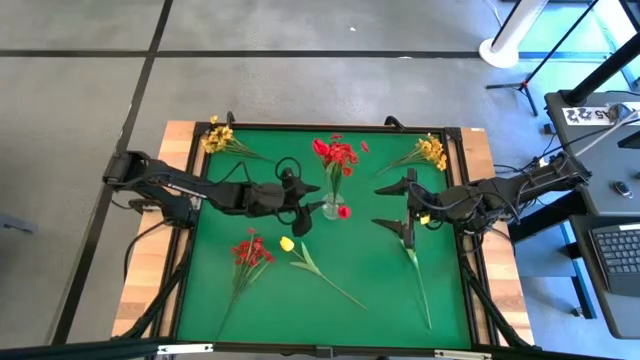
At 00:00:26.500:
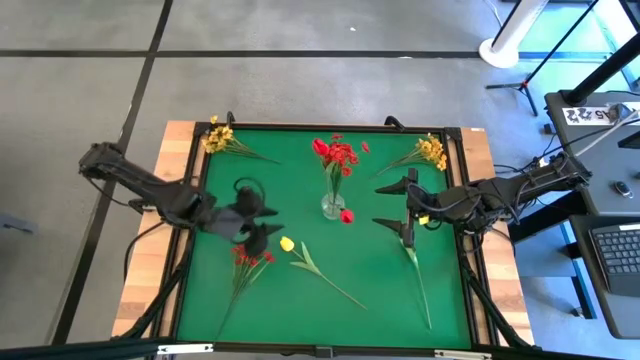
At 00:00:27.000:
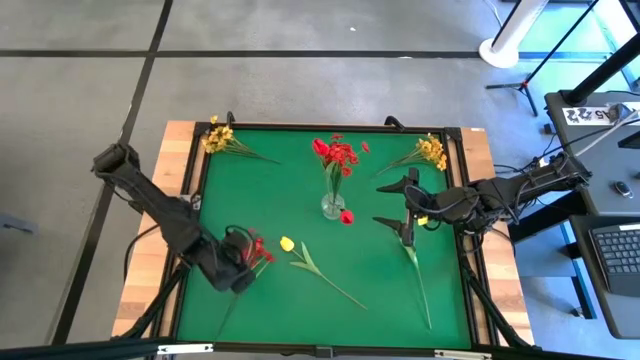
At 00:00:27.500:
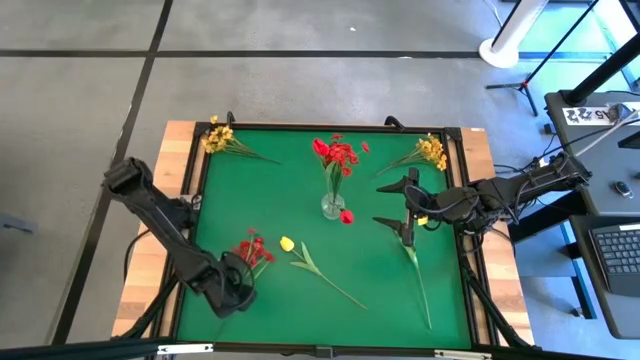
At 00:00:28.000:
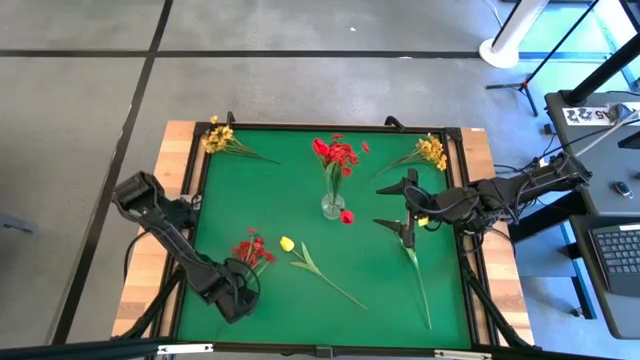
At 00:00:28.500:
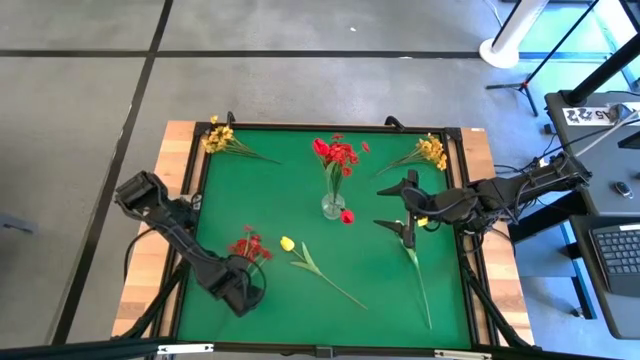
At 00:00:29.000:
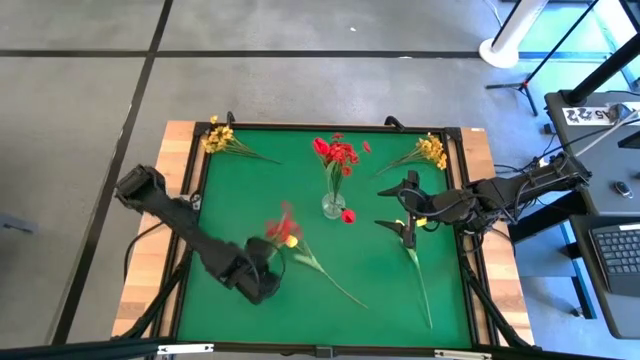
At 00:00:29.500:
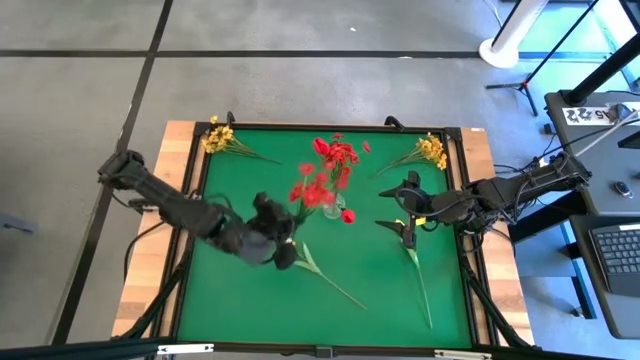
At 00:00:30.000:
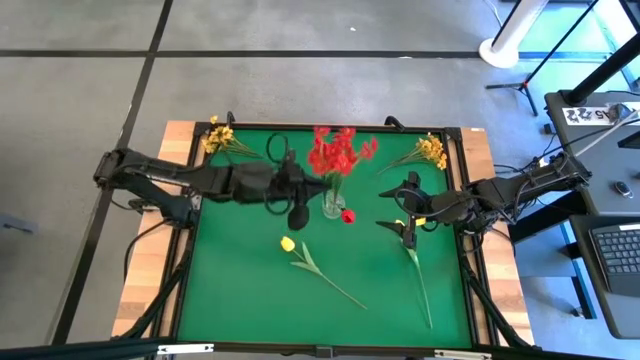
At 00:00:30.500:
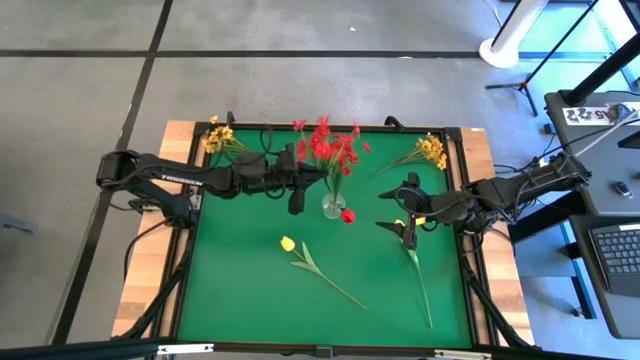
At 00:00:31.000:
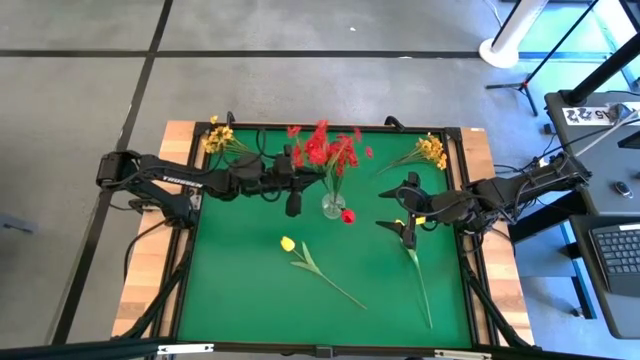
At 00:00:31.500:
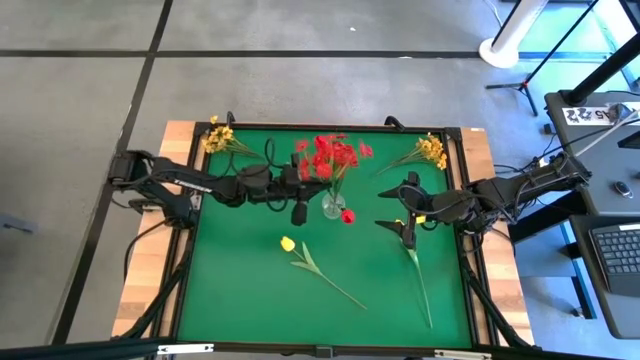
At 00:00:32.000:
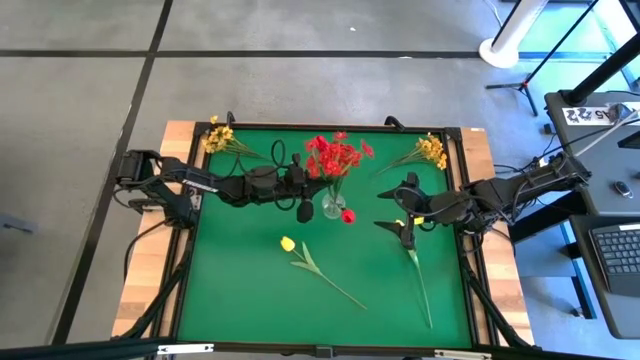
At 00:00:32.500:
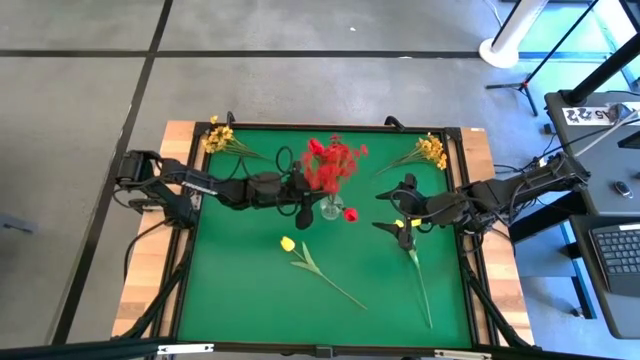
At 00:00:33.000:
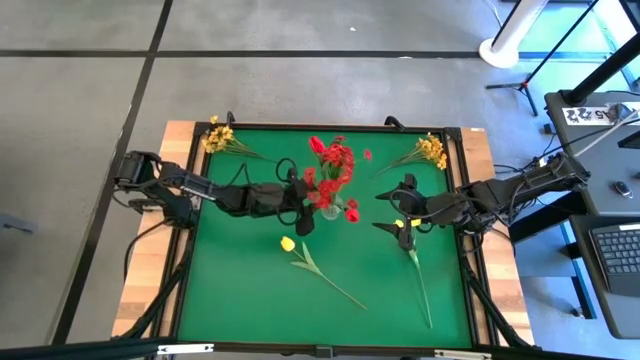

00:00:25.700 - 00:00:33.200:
Task: Sort flowers into vase by color
Put the red flowers into the transparent vase

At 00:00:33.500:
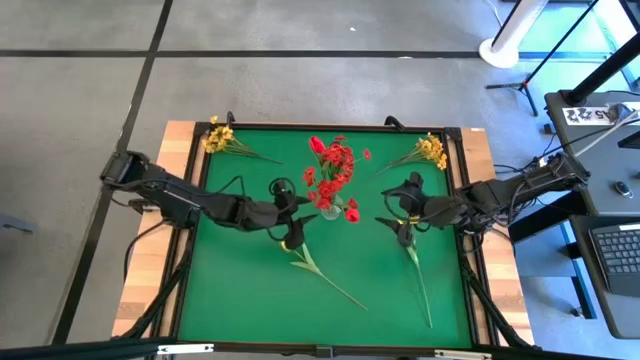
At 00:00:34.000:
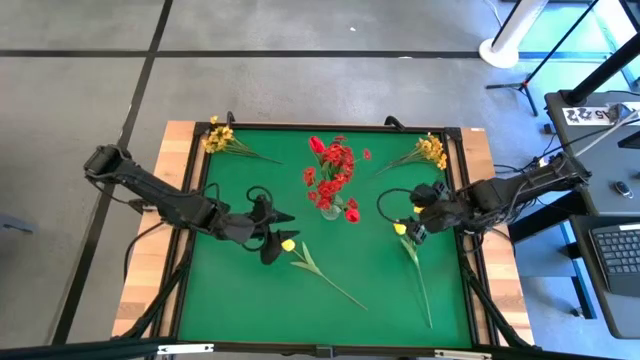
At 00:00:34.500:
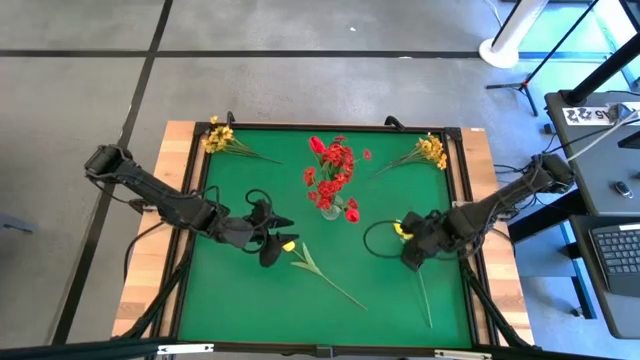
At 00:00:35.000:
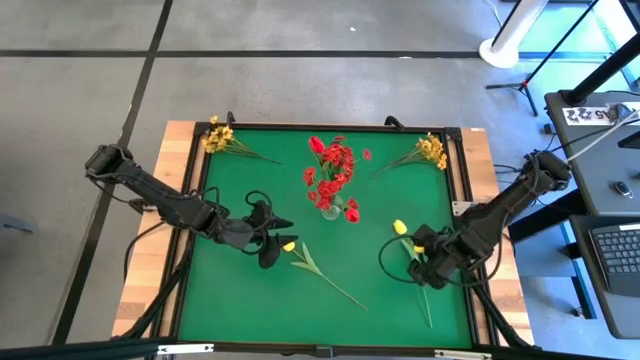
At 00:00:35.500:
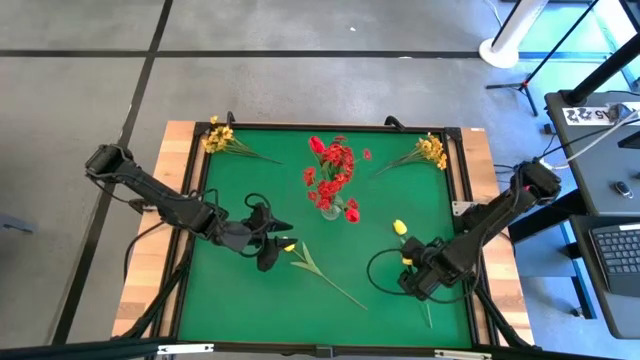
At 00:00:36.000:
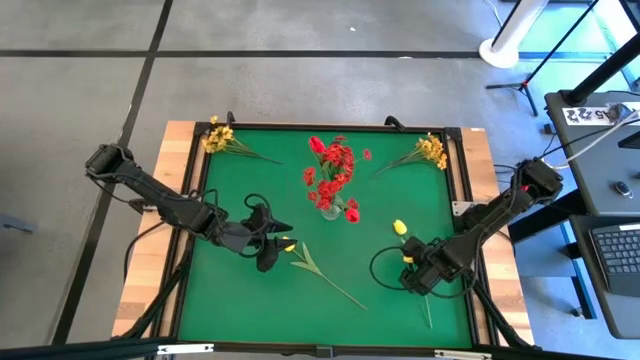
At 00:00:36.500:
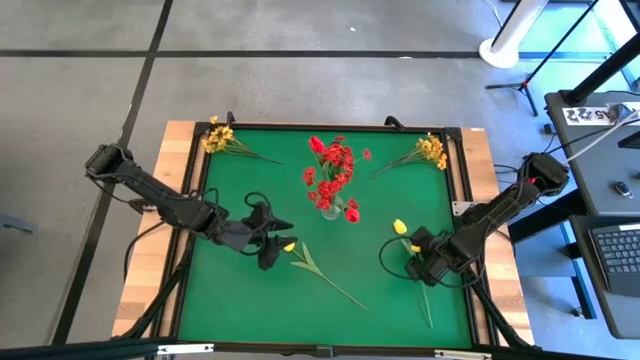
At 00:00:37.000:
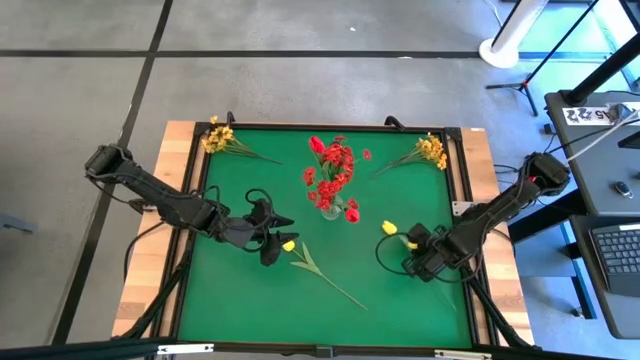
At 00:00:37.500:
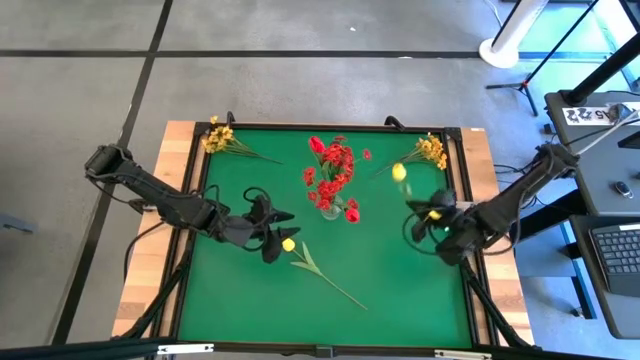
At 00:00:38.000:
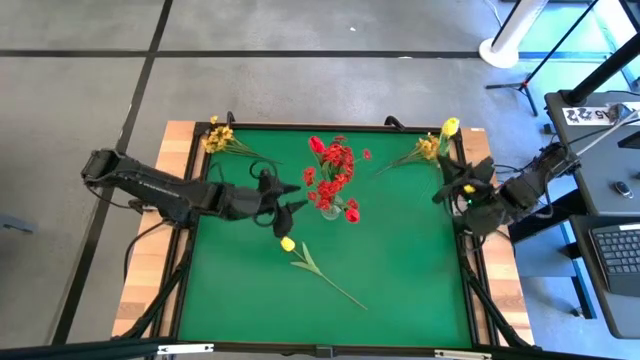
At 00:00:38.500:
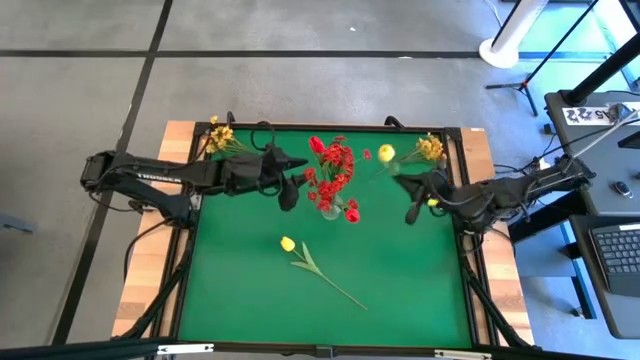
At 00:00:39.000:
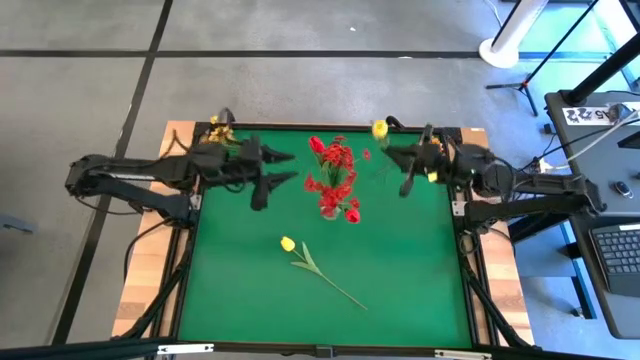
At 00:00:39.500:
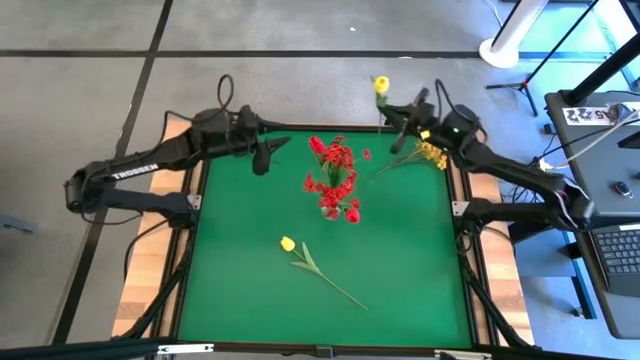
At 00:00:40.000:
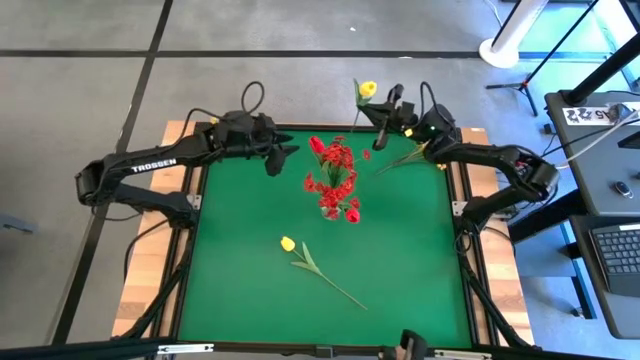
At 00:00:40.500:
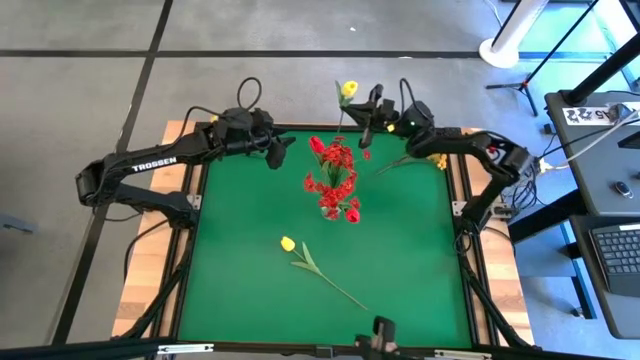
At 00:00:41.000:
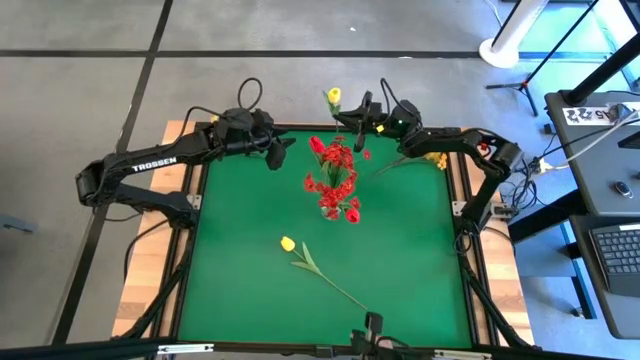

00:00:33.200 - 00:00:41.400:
Put the right yellow flower into the red vase

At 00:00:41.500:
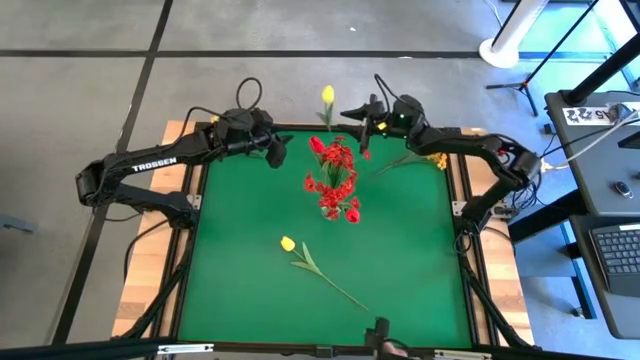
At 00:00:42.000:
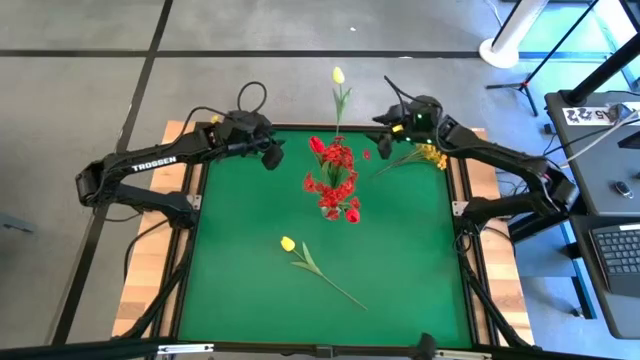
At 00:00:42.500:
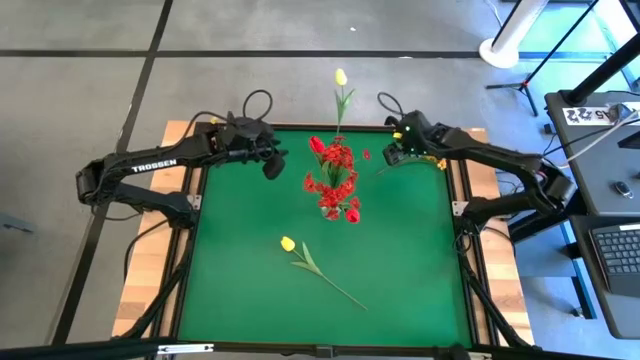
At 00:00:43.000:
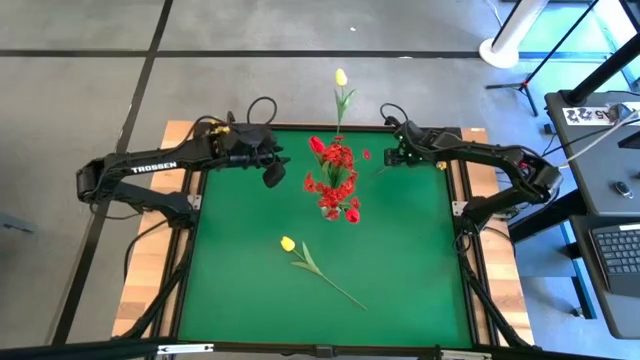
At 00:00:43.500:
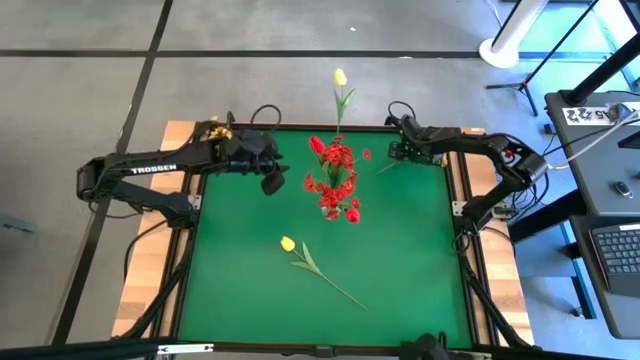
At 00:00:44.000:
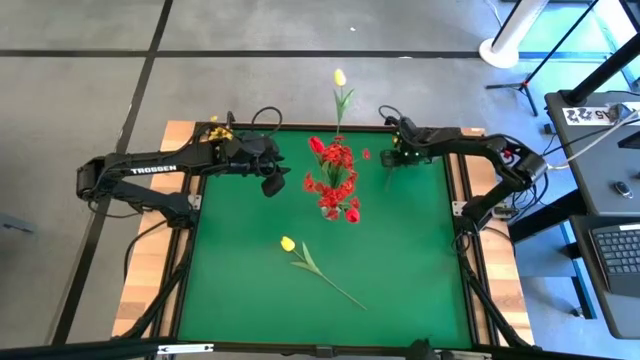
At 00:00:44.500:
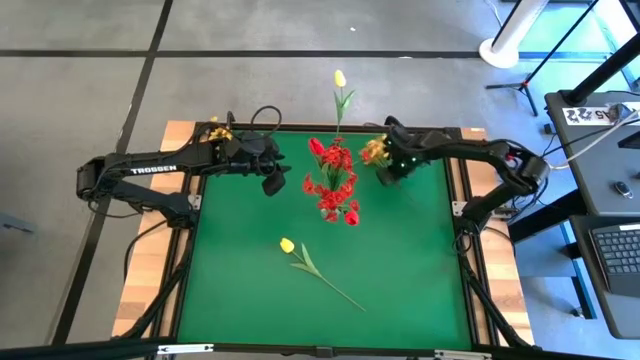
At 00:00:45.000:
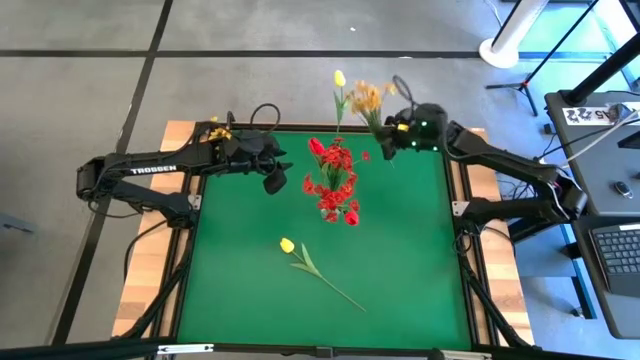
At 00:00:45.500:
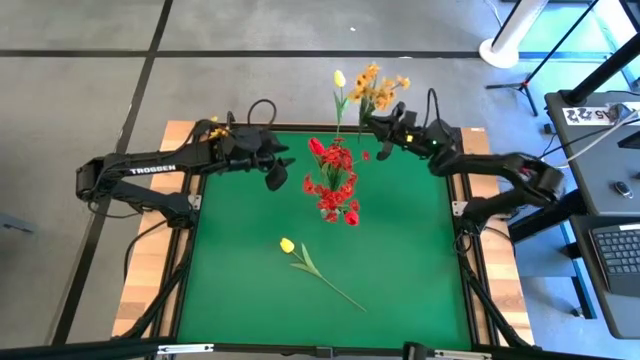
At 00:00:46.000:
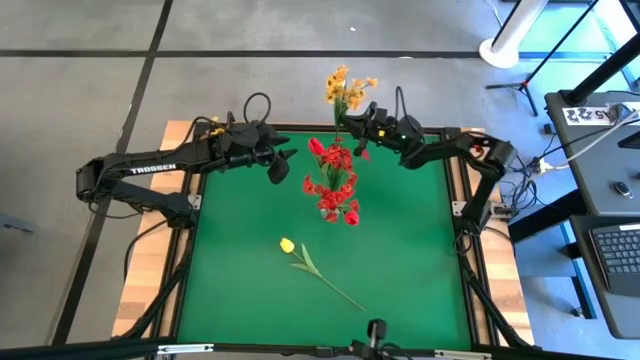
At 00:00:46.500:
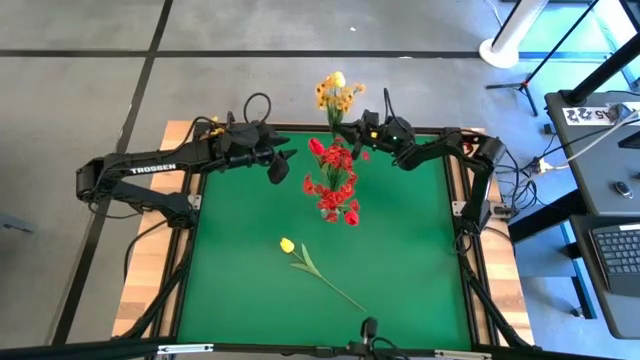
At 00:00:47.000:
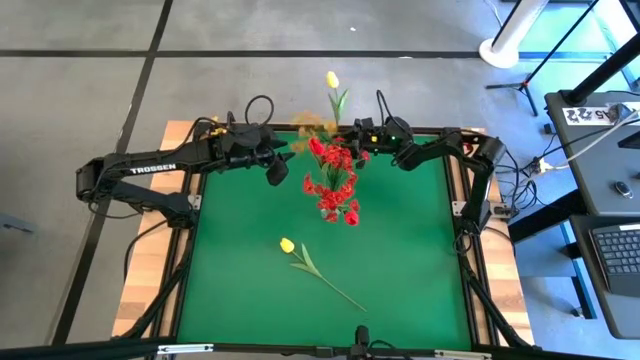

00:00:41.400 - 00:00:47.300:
Put the right yellow flowers into the red vase
